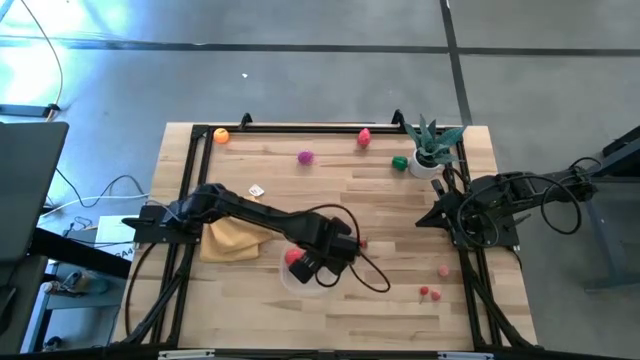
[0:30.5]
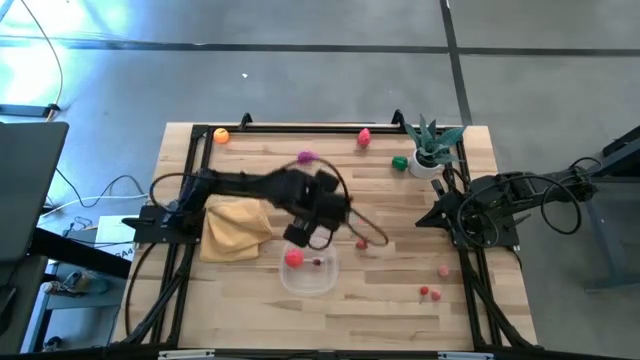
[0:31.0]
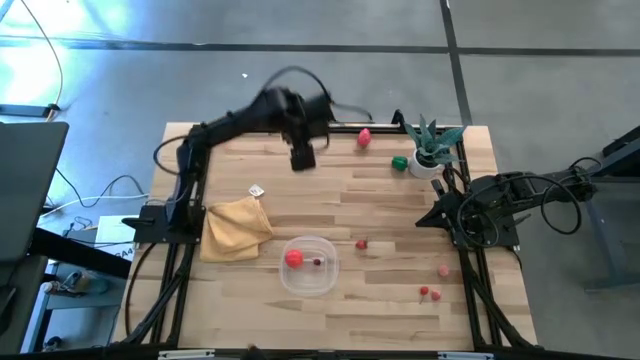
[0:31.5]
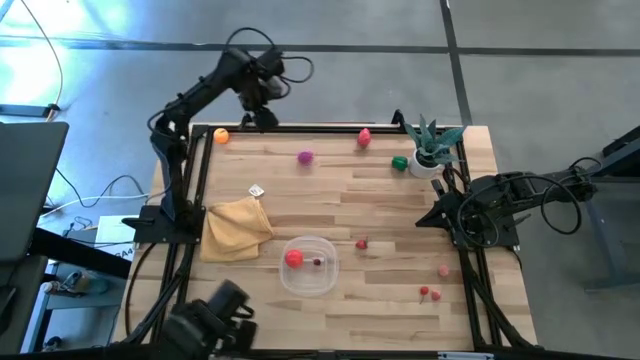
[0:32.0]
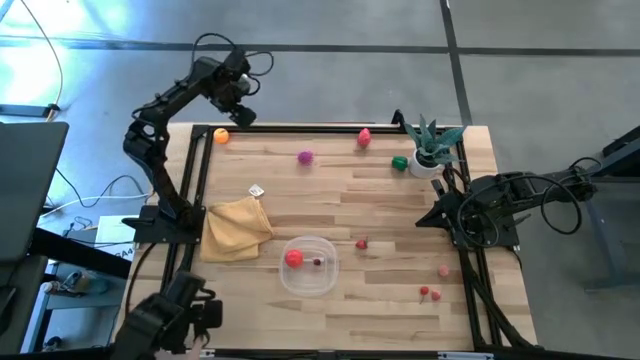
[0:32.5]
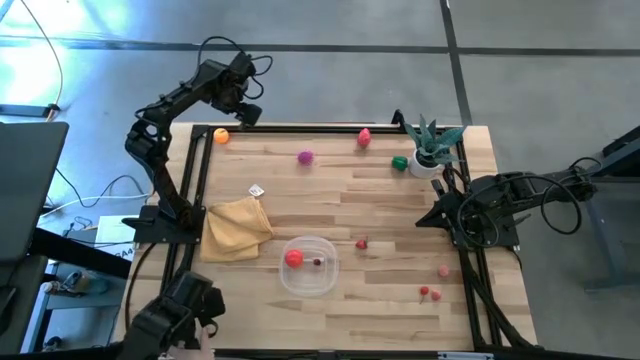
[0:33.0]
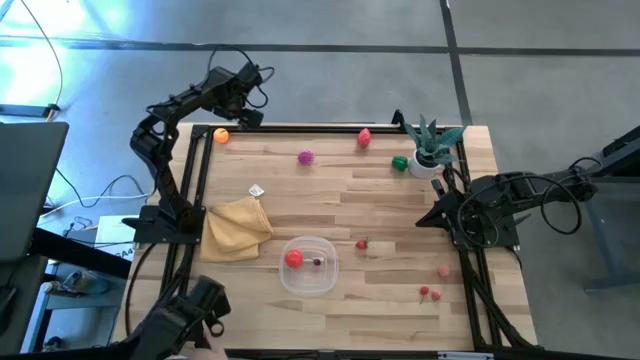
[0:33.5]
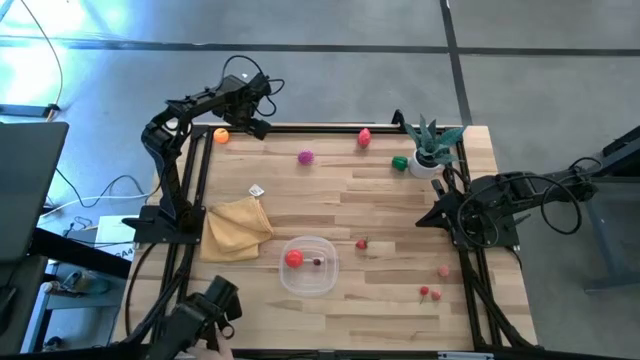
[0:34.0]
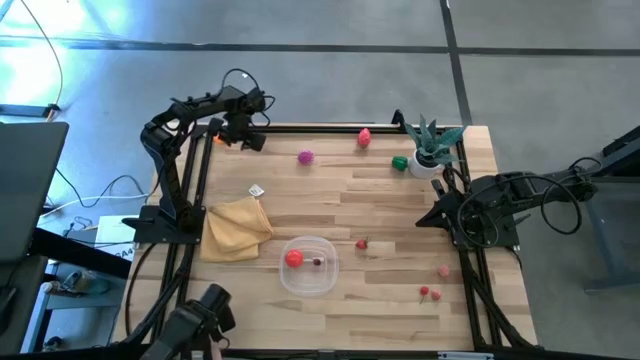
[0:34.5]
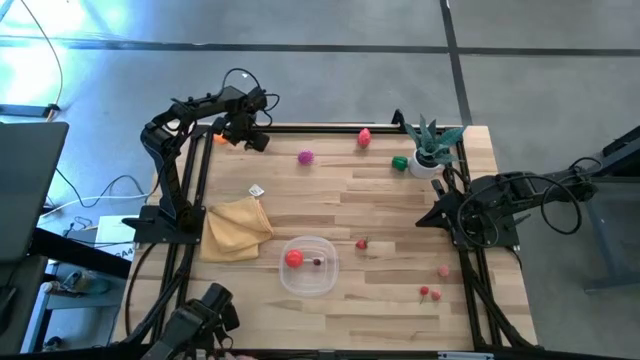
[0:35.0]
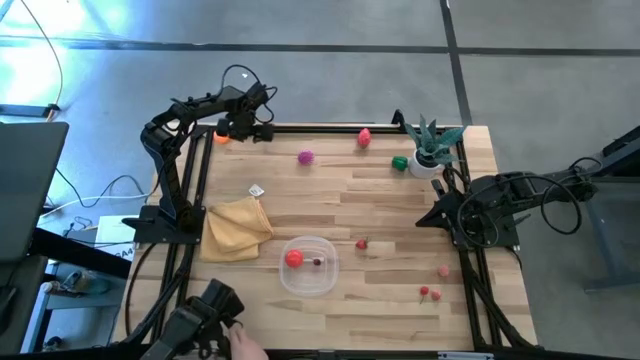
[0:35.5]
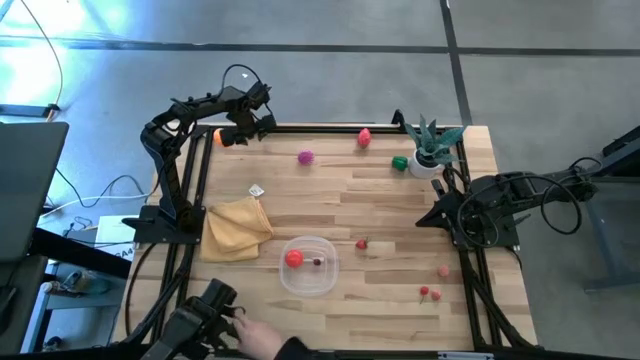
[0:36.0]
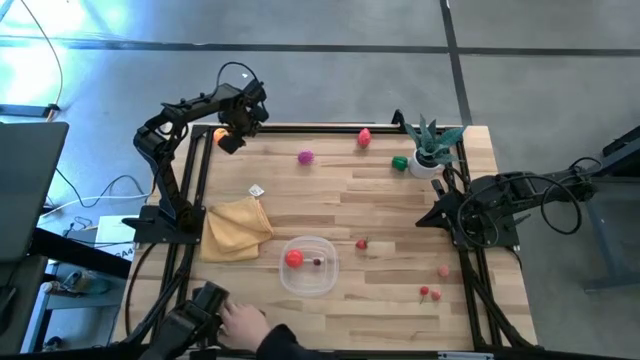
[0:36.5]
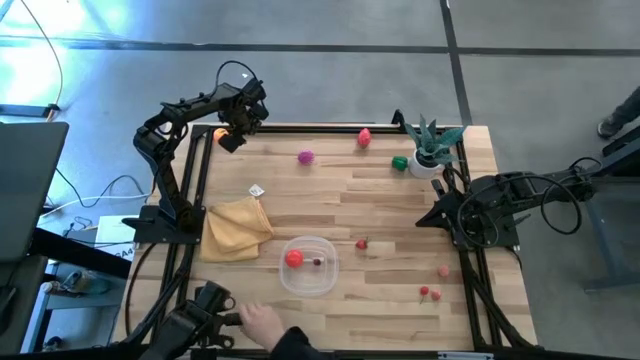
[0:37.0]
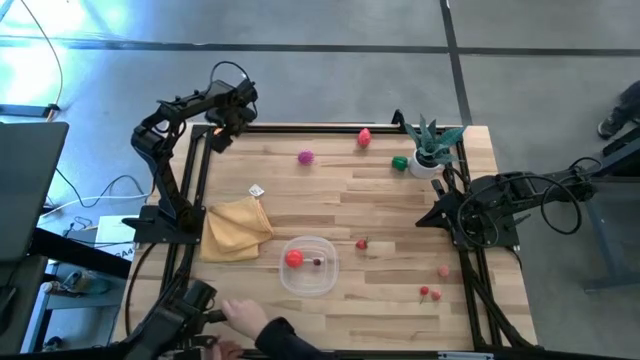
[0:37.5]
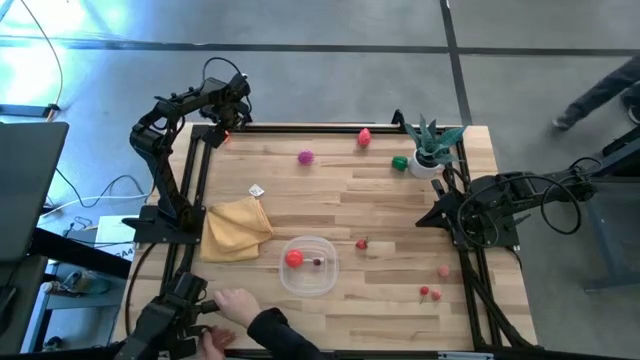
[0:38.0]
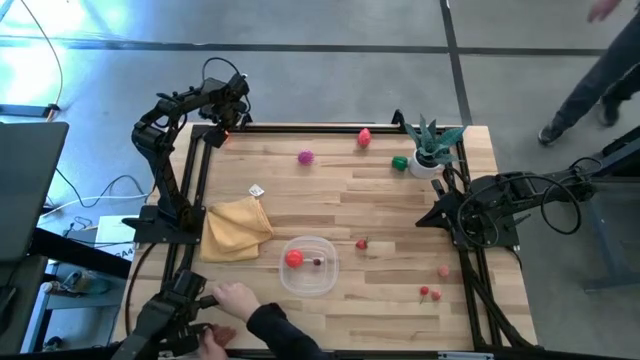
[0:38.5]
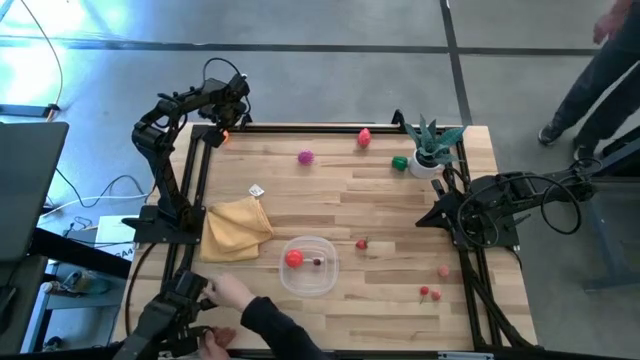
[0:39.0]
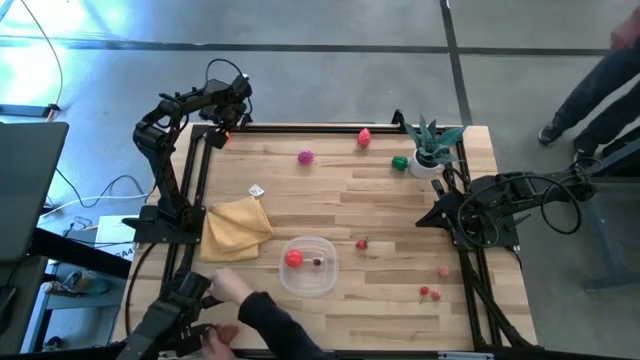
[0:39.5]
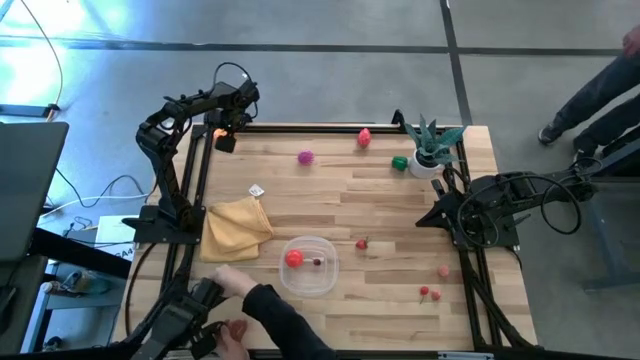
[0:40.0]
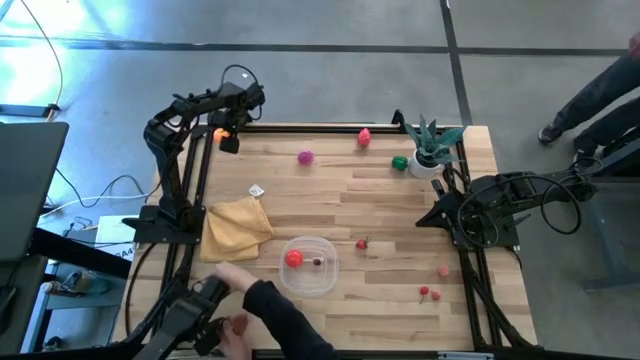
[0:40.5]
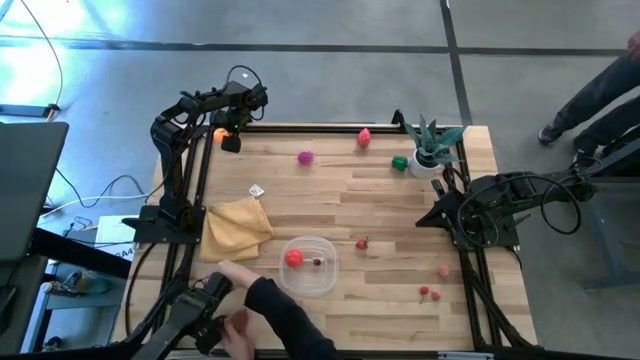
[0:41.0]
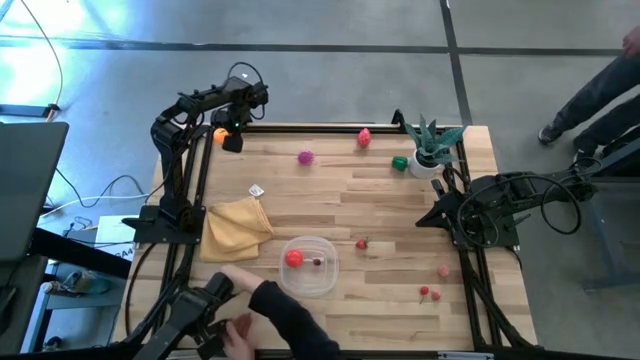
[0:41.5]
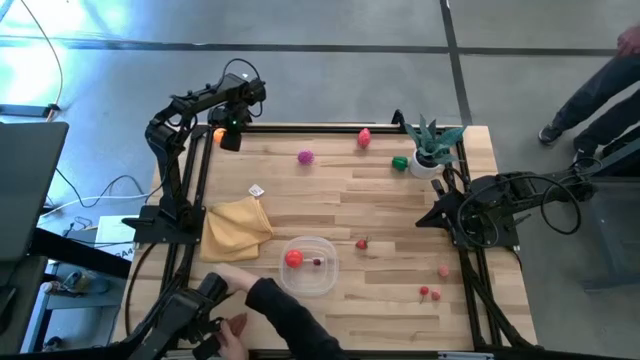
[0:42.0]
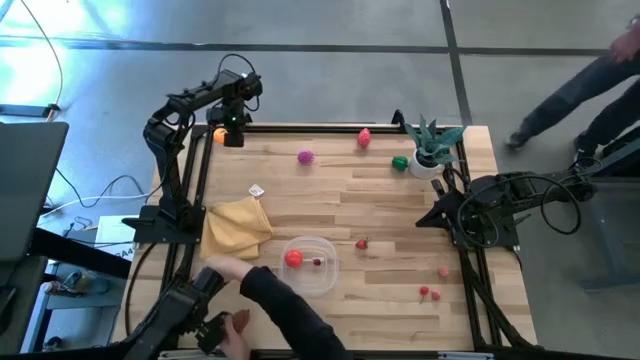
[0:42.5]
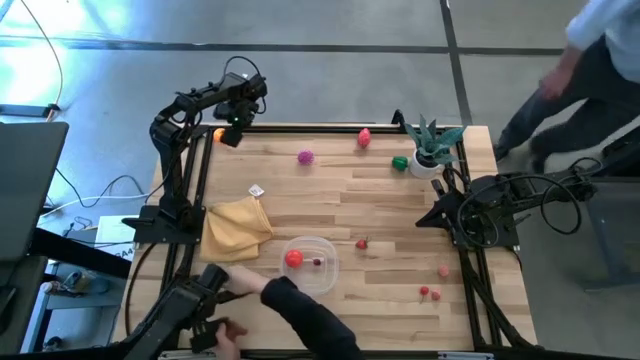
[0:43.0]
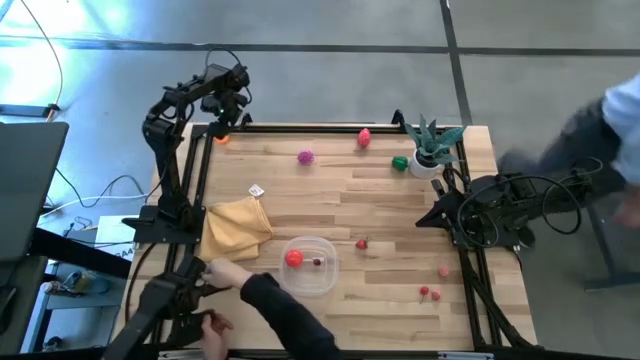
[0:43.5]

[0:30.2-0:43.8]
Task: Pick and placing Produce into tupperware
Put the orange into the transparent bin

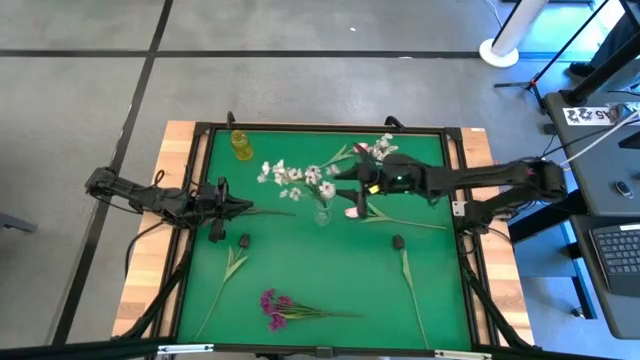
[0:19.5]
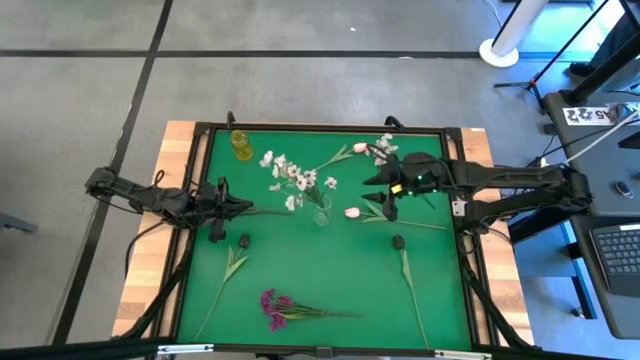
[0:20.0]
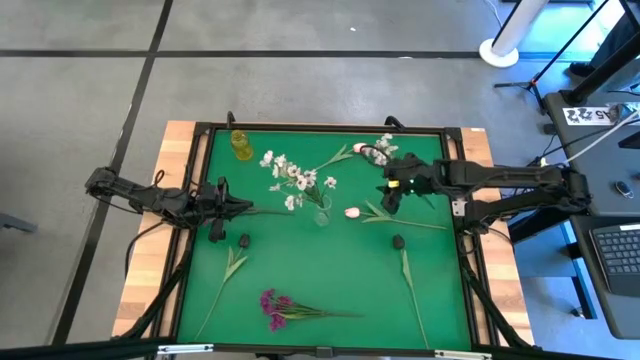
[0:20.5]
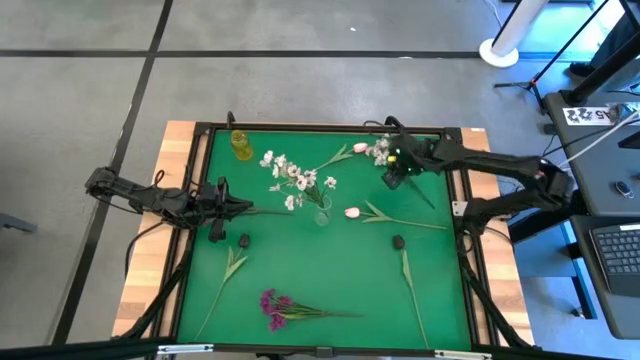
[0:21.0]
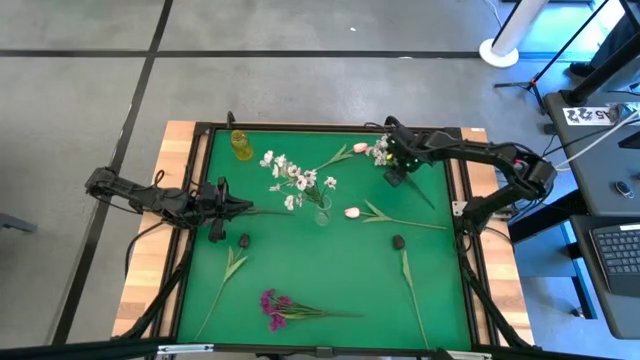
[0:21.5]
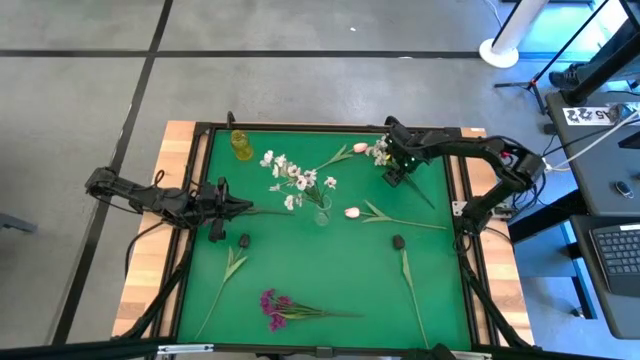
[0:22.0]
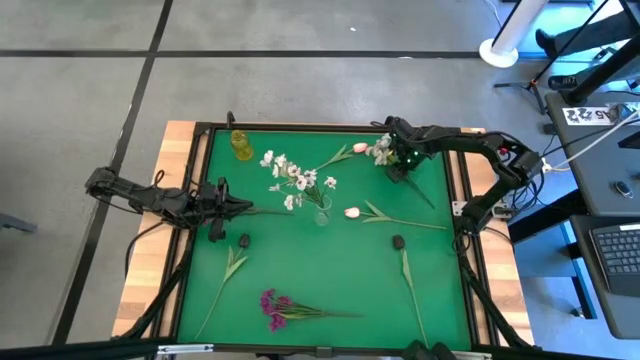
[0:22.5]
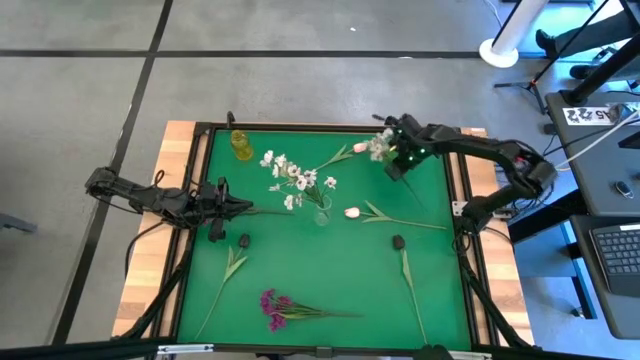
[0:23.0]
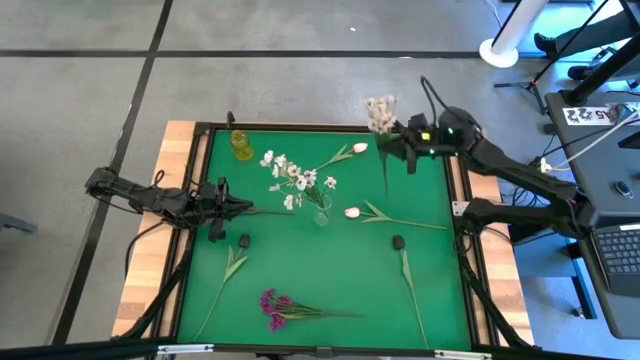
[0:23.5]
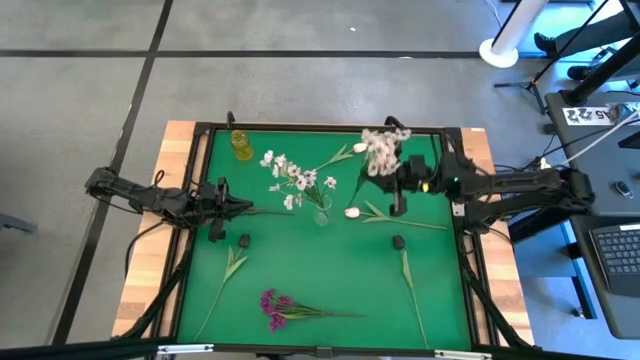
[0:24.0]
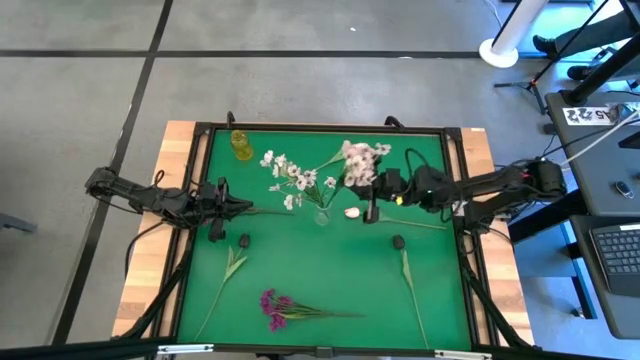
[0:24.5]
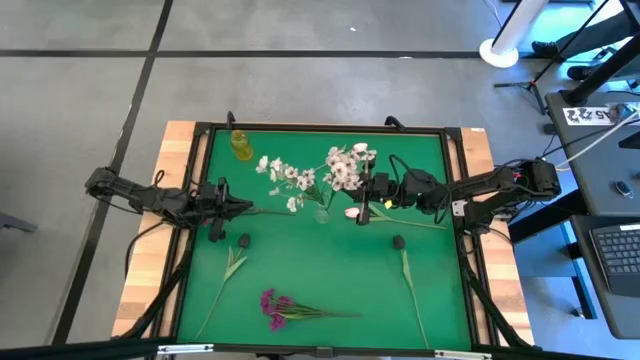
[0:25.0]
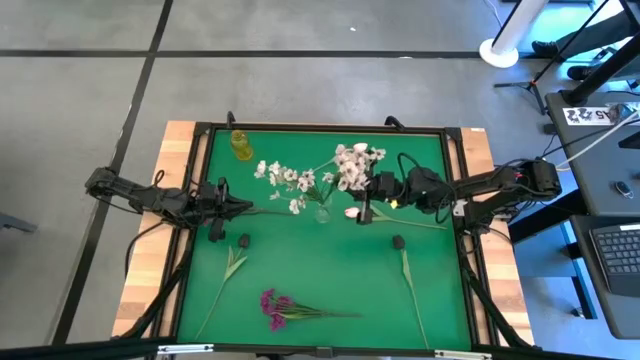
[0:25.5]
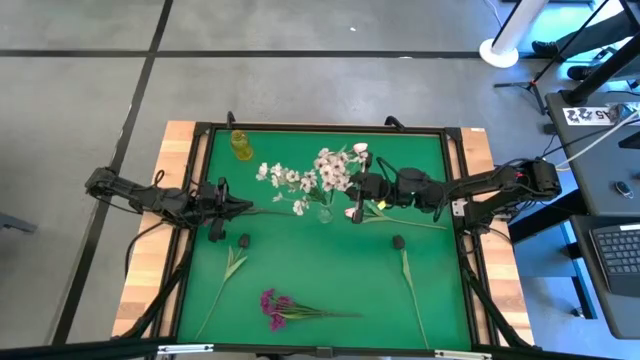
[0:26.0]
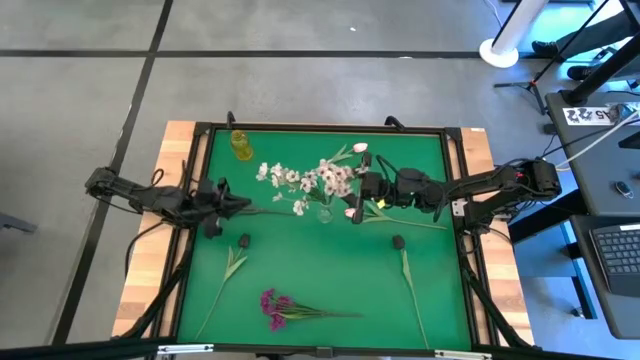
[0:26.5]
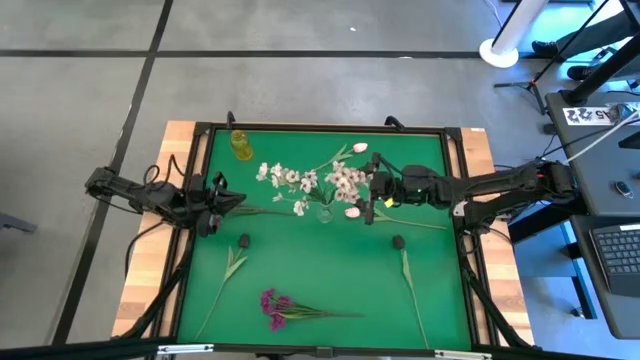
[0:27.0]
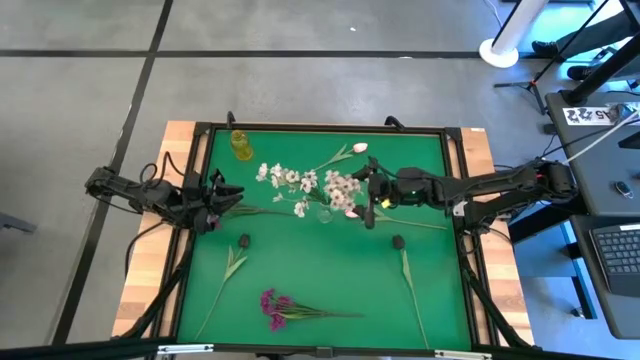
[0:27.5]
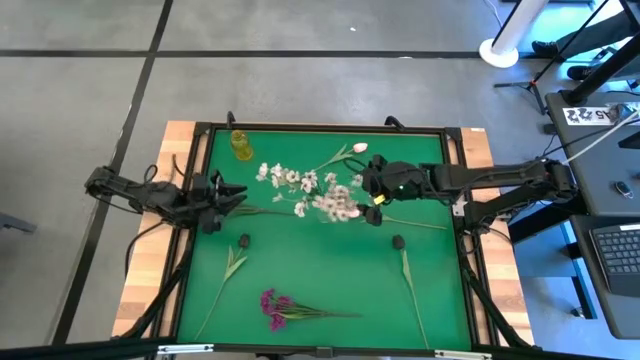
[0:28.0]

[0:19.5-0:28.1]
Task: Sort flowers into vase by color
Put the white flowers into the transparent vase
